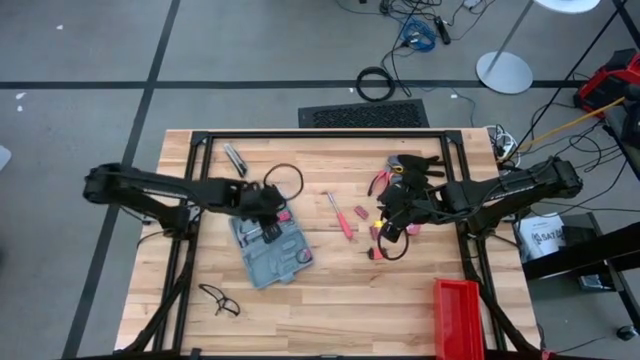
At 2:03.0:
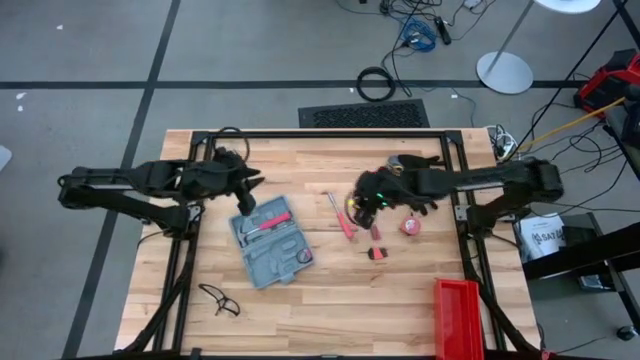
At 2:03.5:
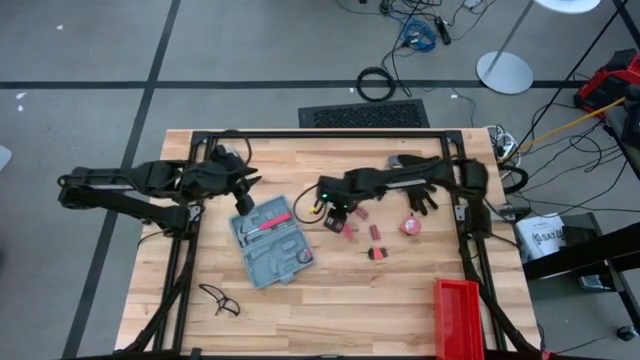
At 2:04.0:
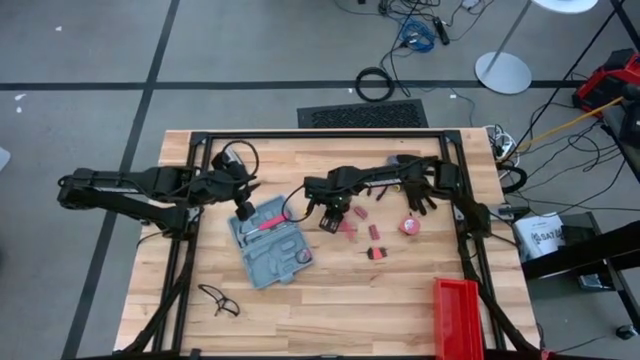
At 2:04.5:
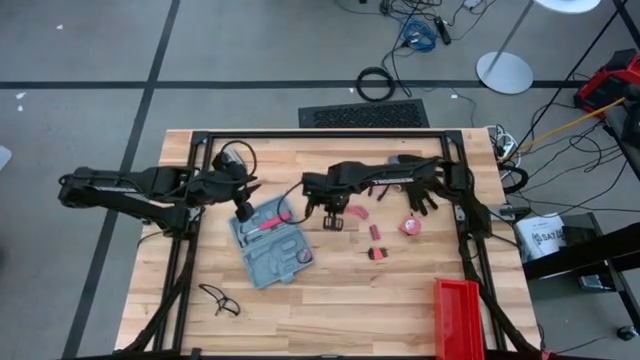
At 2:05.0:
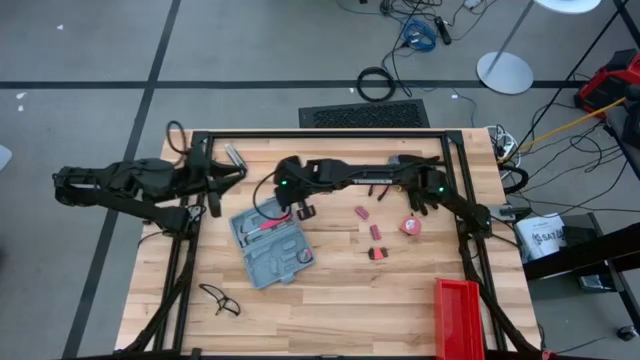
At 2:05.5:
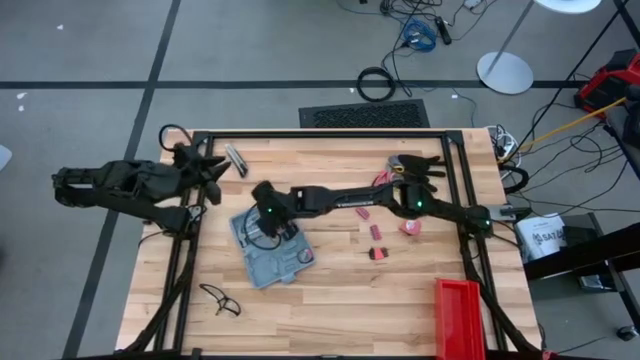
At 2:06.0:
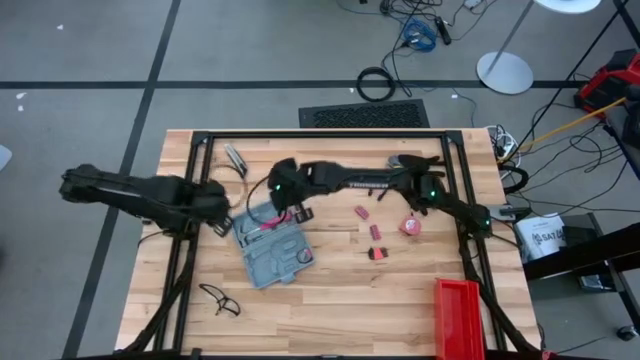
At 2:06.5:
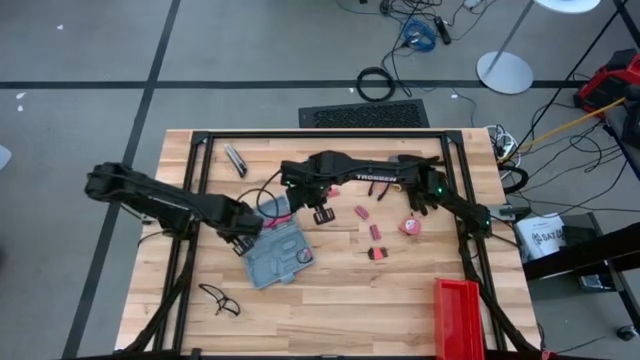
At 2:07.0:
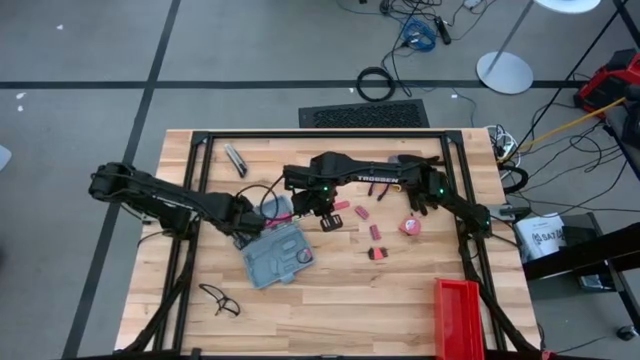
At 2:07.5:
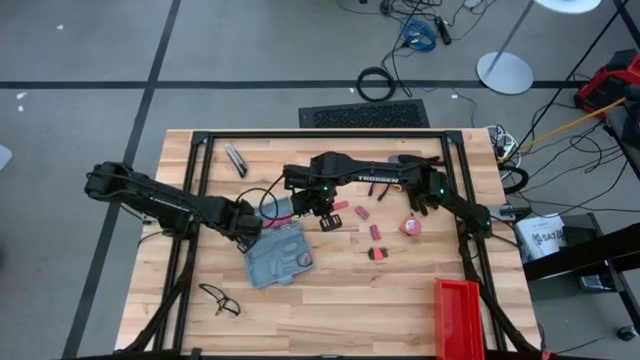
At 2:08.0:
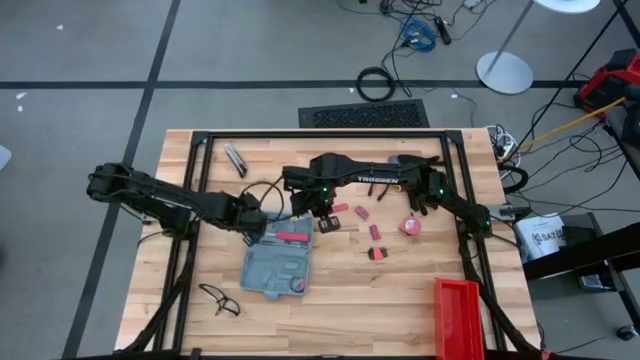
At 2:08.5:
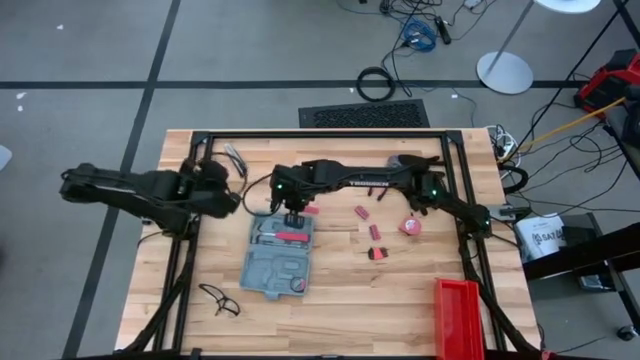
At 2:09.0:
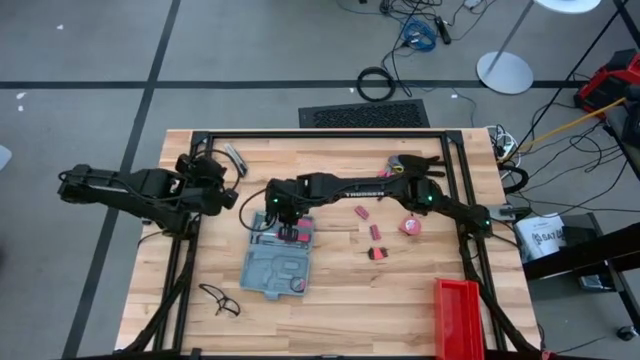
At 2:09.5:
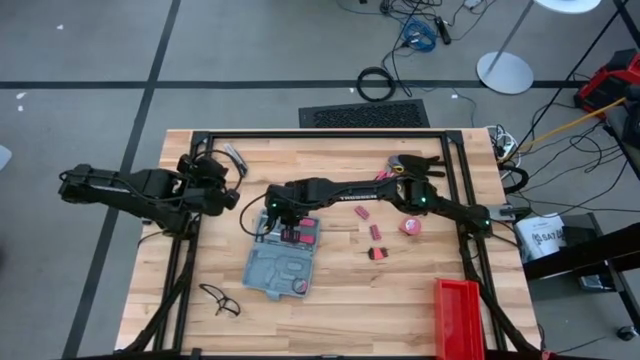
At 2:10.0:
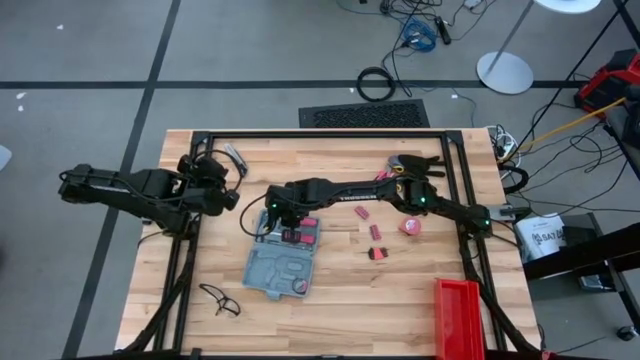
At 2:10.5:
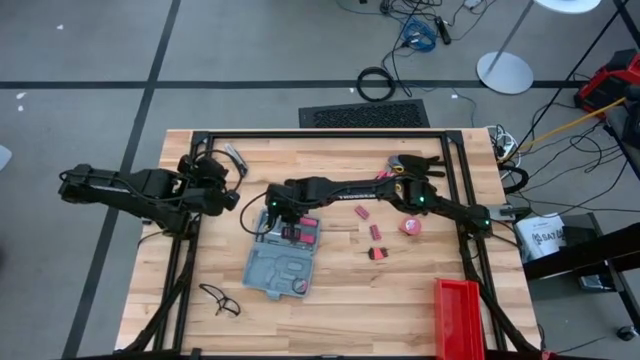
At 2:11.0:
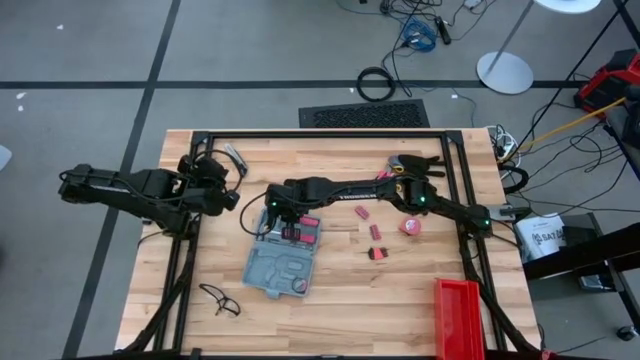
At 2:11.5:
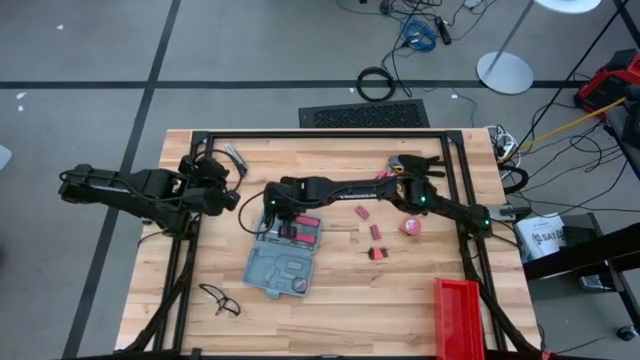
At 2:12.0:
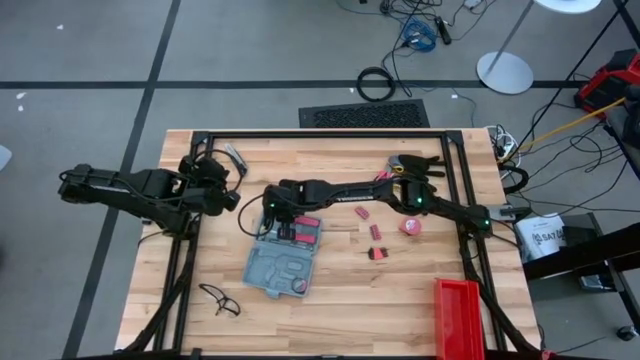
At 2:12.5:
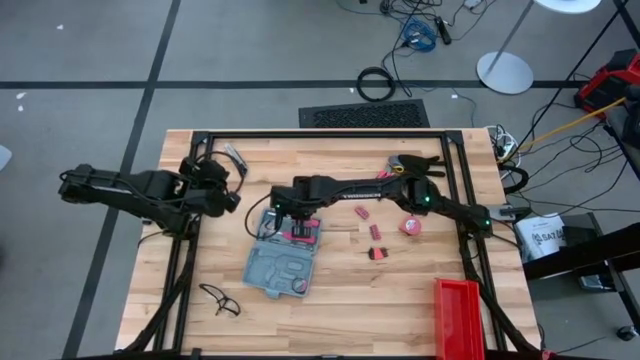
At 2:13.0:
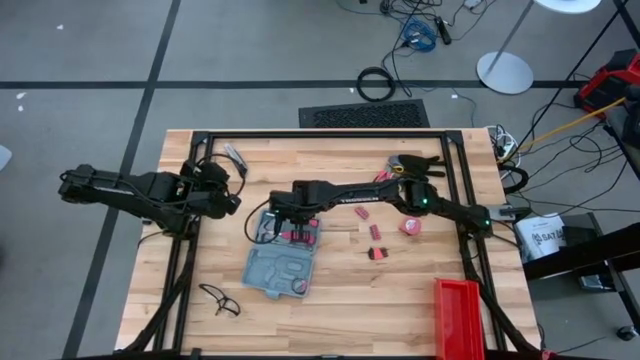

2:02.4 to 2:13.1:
Task: prefit tool cases
Put the pink screwdriver into the gray prefit tool case

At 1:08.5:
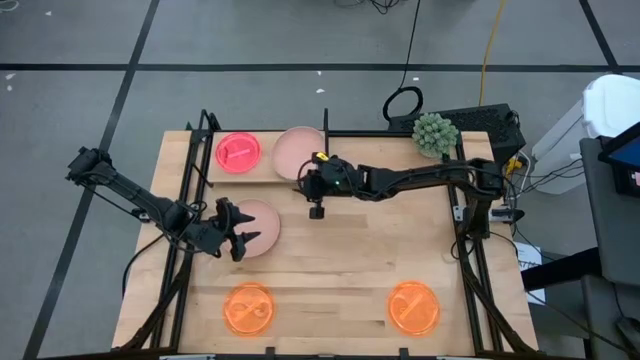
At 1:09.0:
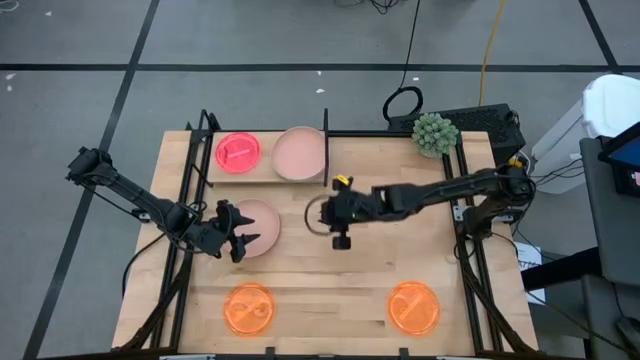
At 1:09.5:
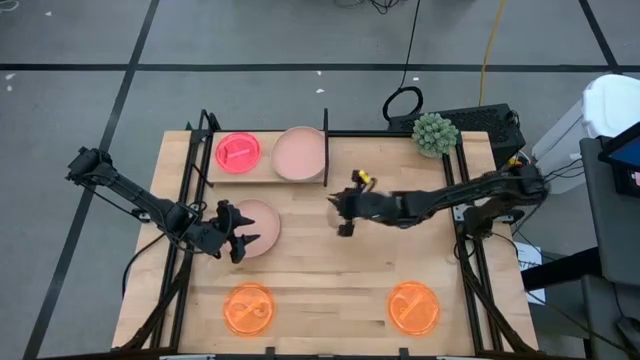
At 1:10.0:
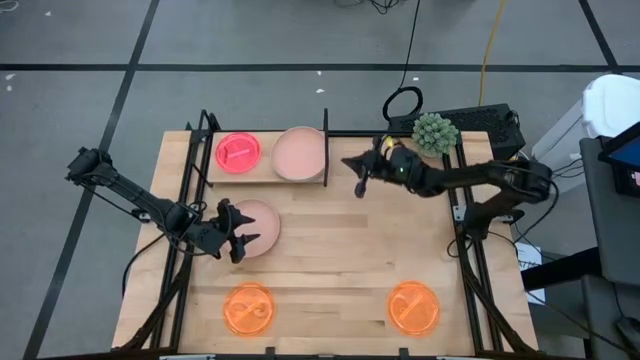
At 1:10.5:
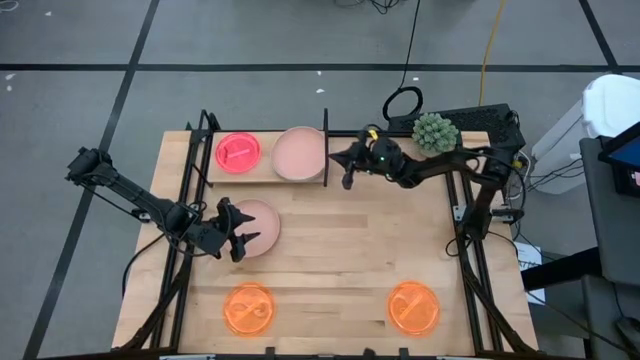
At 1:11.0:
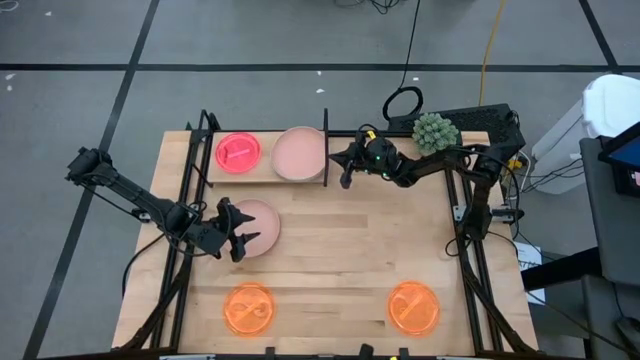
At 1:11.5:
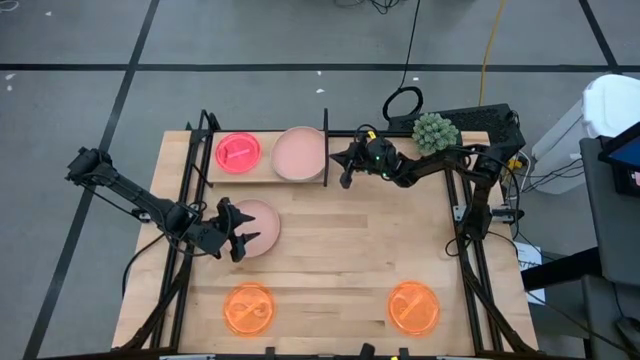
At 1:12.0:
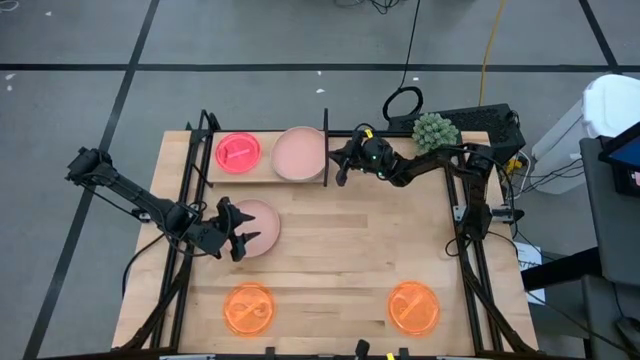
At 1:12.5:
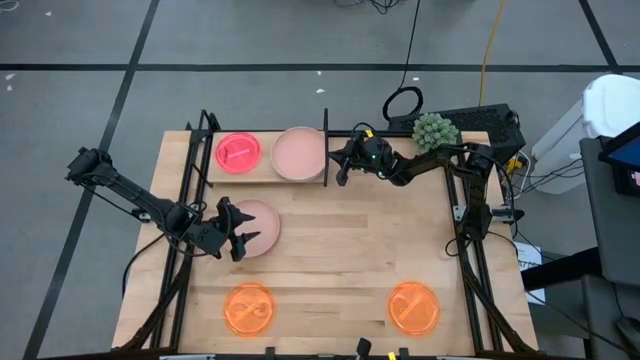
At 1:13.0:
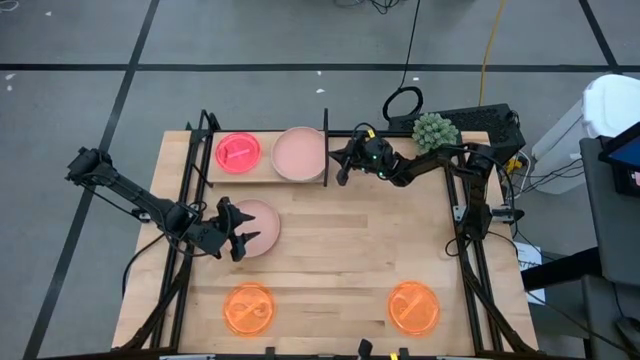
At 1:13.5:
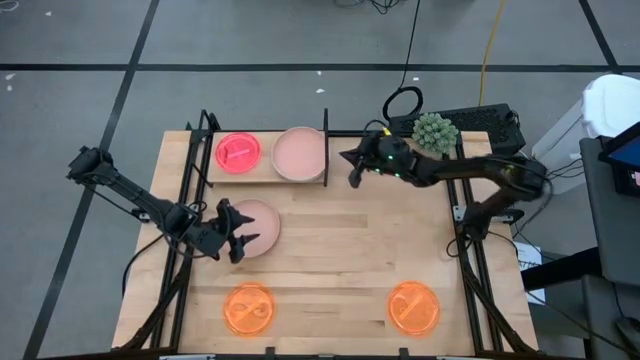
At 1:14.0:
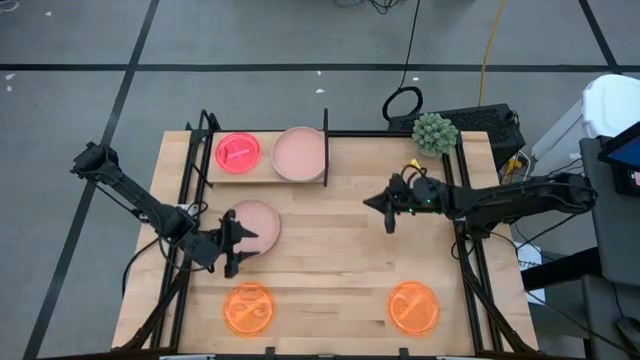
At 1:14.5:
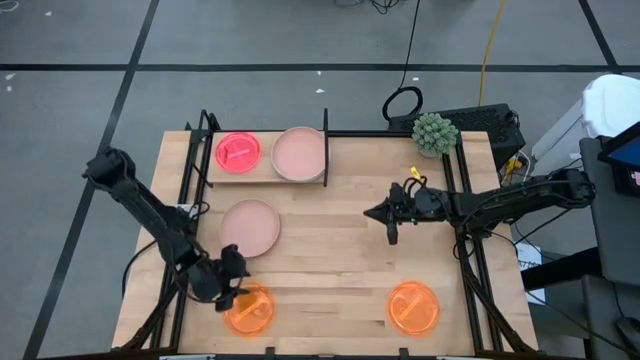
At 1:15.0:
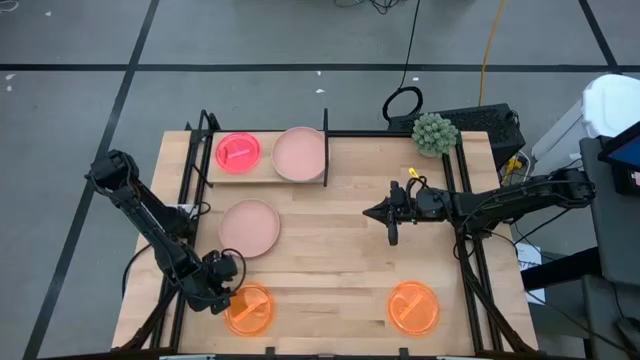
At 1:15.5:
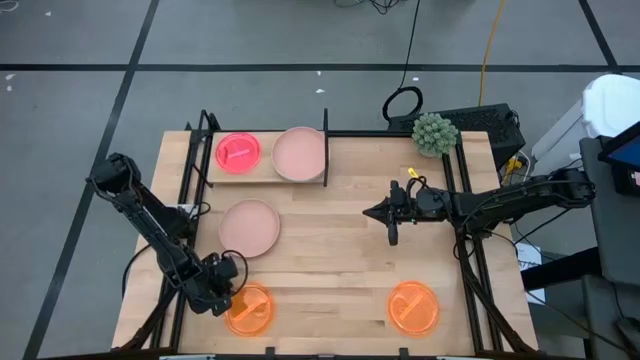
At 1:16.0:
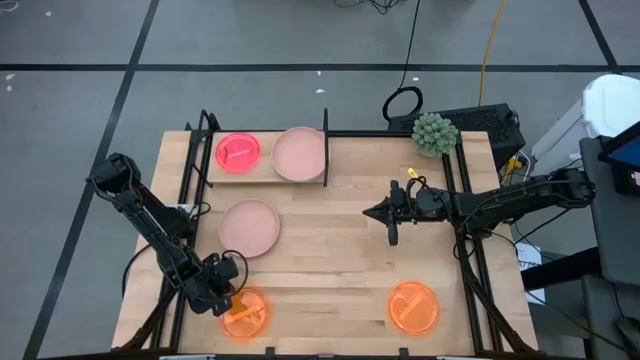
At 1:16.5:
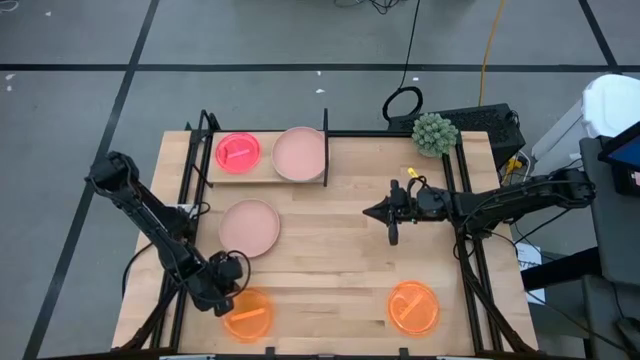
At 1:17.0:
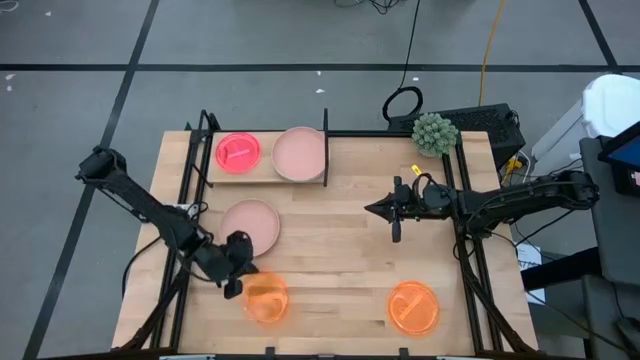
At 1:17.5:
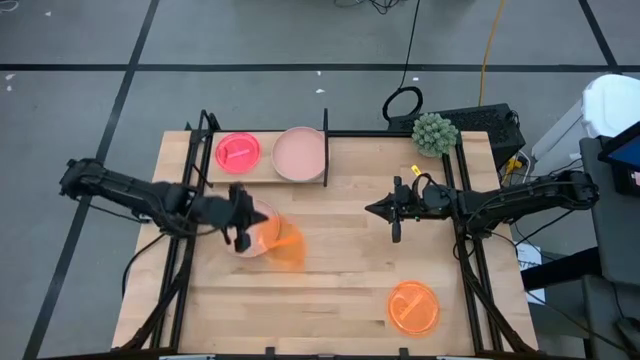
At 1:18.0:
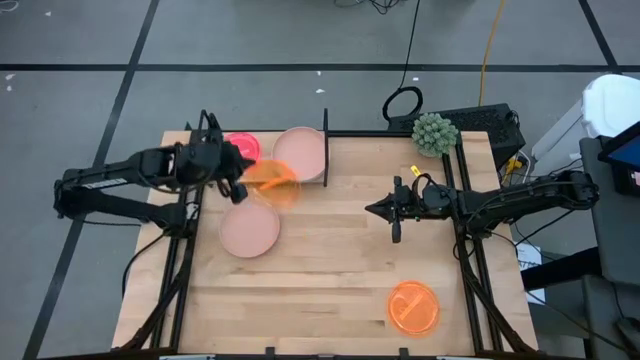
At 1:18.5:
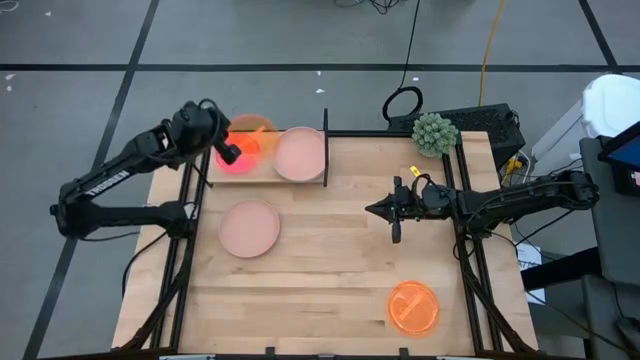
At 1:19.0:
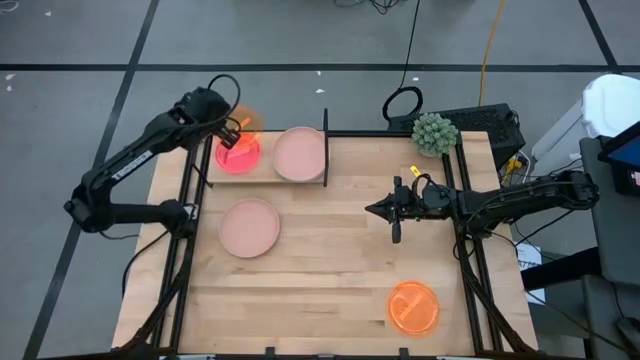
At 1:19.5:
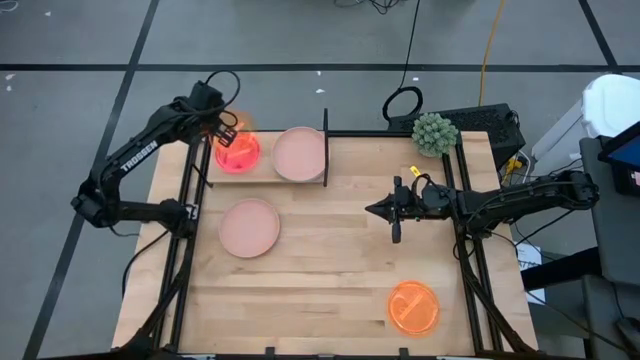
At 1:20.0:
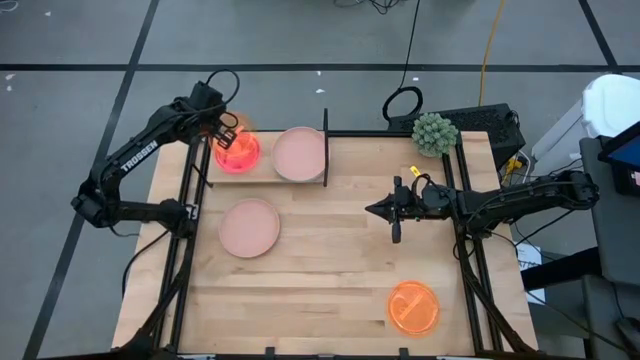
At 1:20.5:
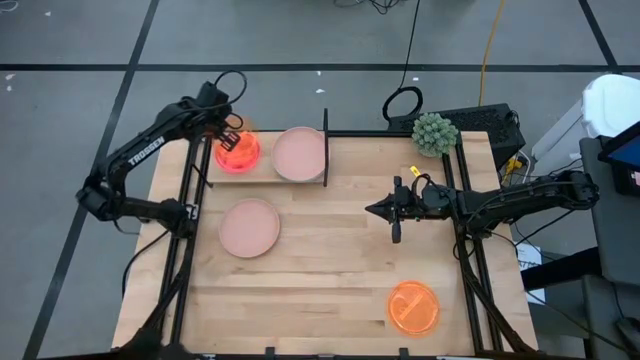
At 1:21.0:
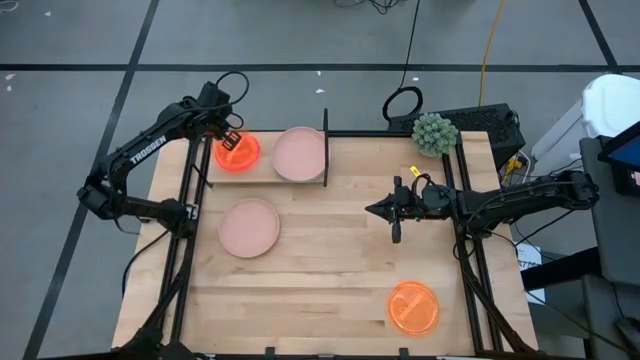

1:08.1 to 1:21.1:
Task: Place and stack plates onto a shelf
Stack the left orange transparent plate on top of the pink transparent plate on the shelf
